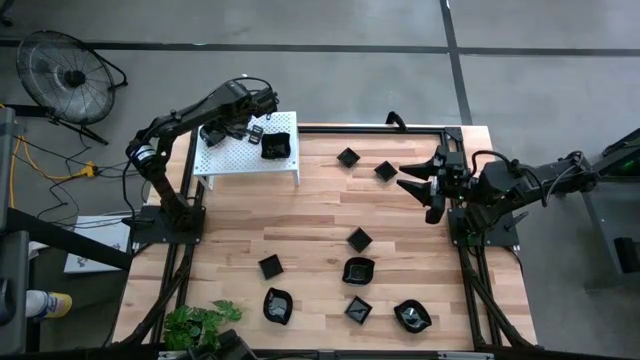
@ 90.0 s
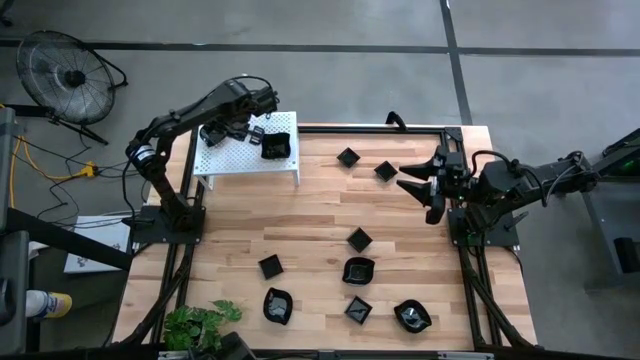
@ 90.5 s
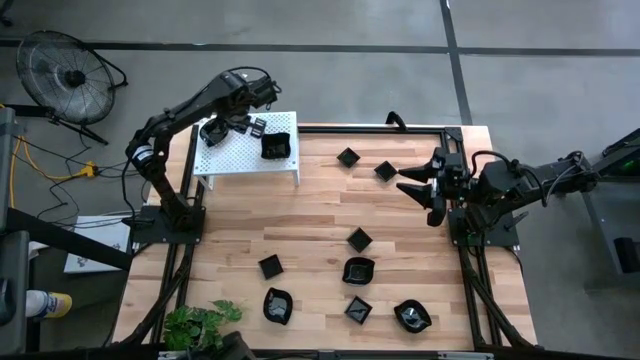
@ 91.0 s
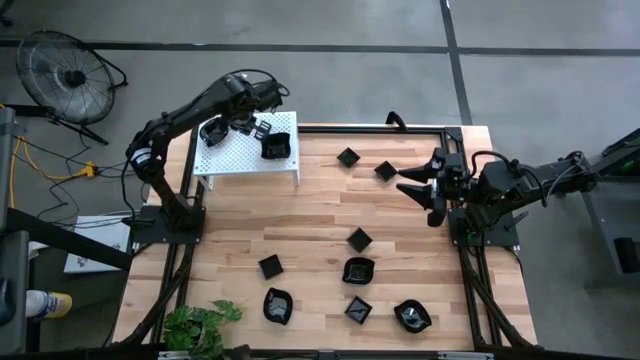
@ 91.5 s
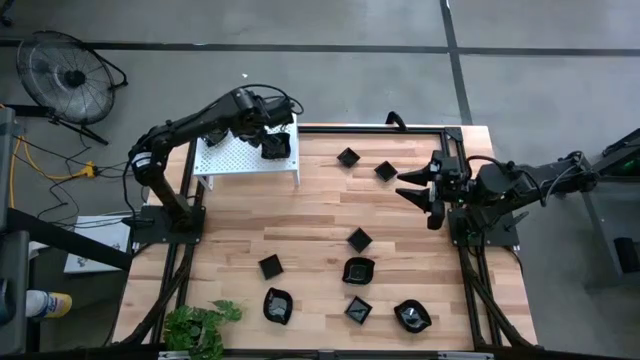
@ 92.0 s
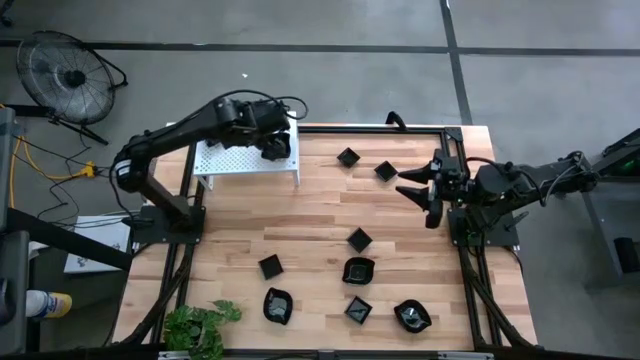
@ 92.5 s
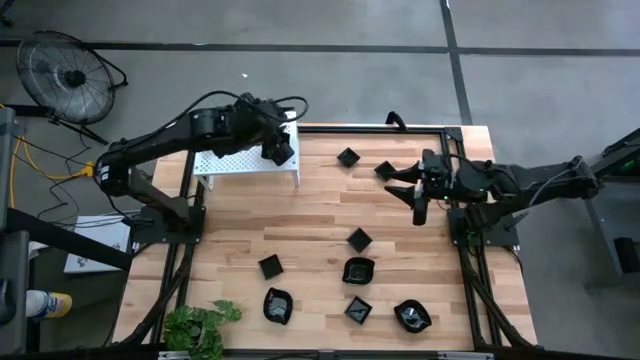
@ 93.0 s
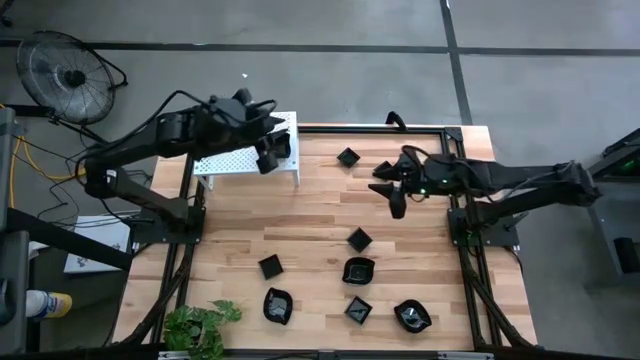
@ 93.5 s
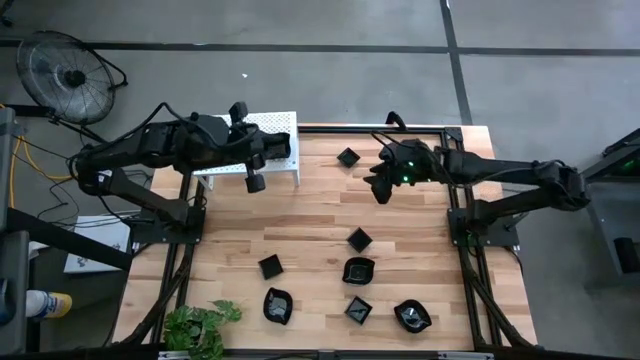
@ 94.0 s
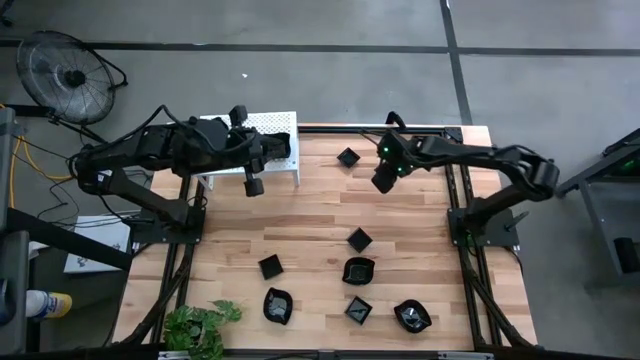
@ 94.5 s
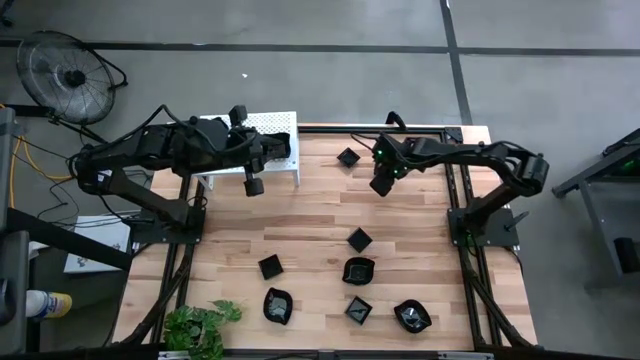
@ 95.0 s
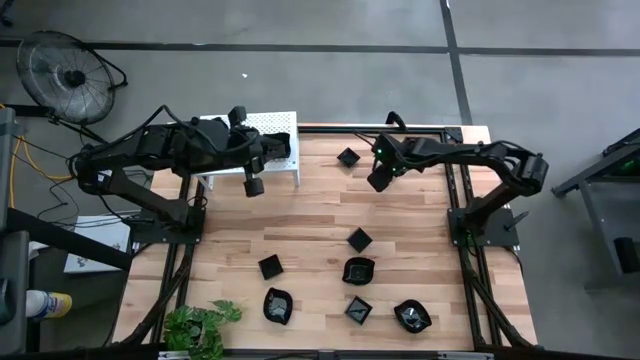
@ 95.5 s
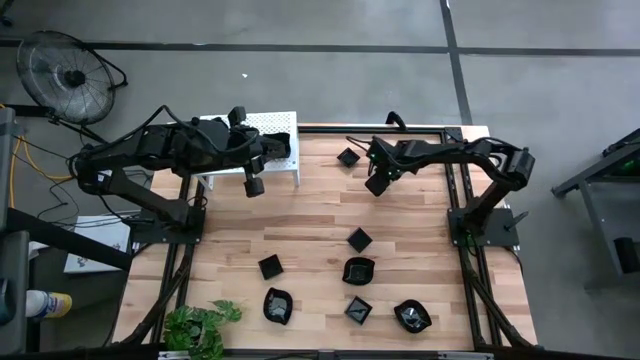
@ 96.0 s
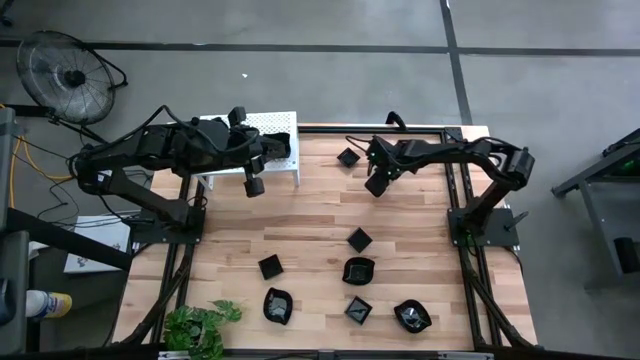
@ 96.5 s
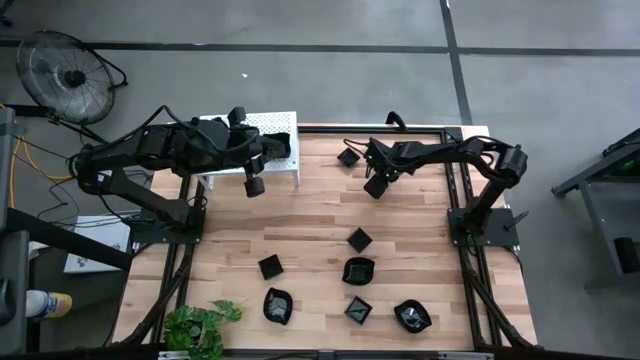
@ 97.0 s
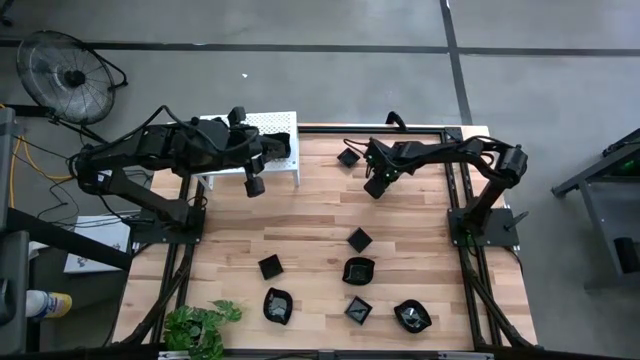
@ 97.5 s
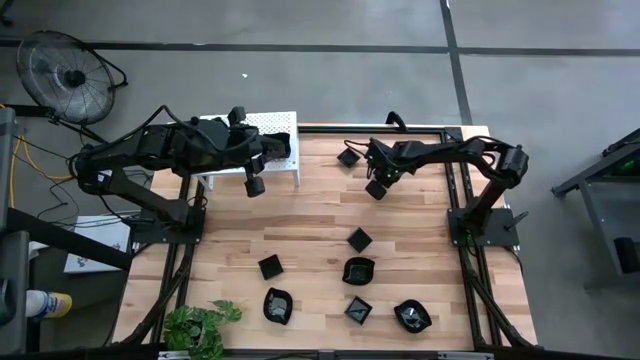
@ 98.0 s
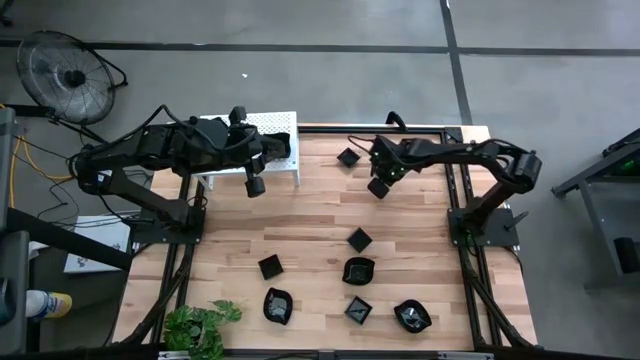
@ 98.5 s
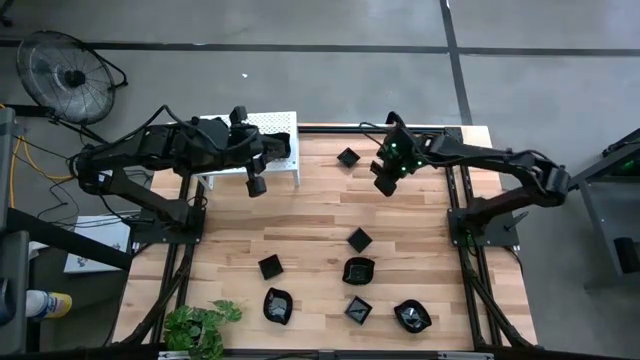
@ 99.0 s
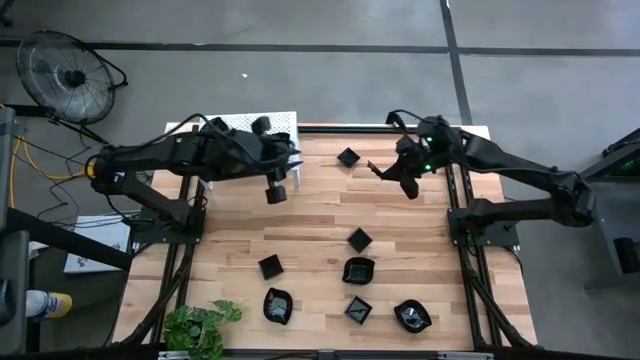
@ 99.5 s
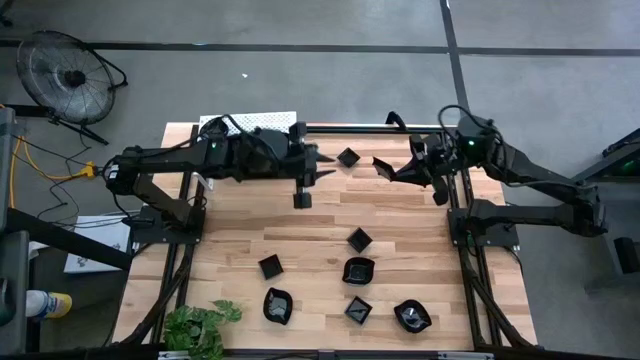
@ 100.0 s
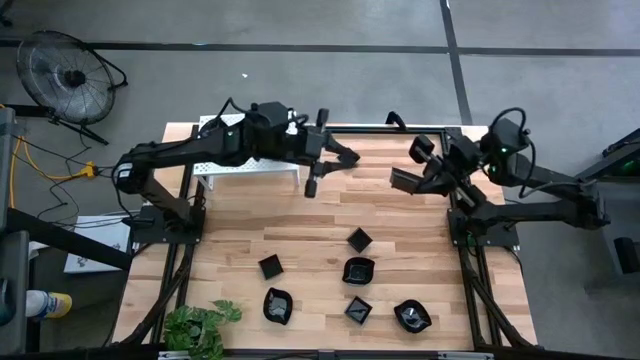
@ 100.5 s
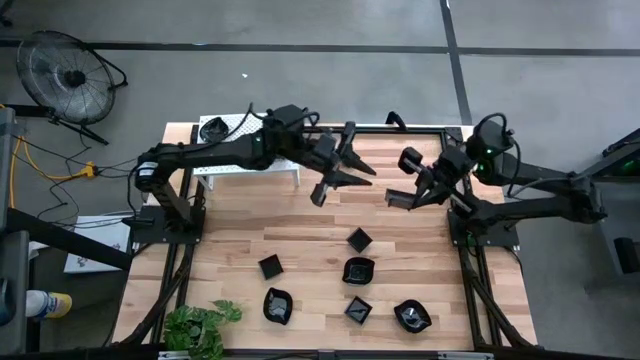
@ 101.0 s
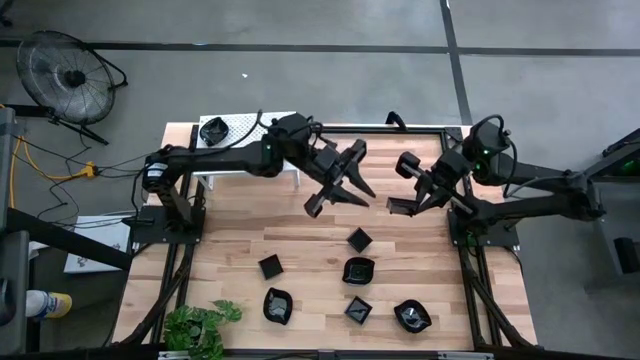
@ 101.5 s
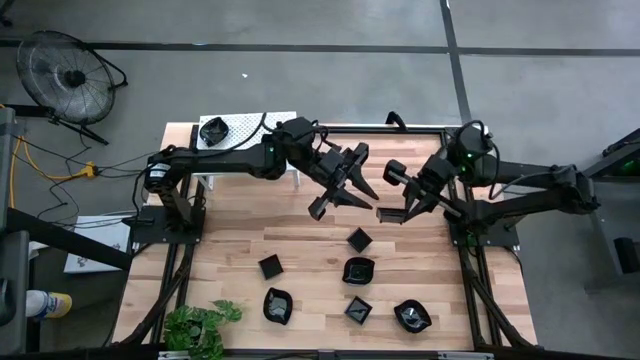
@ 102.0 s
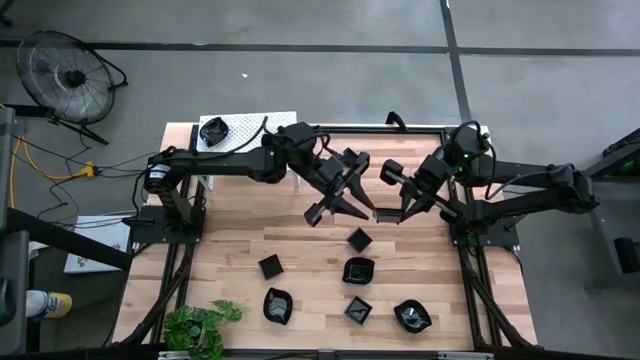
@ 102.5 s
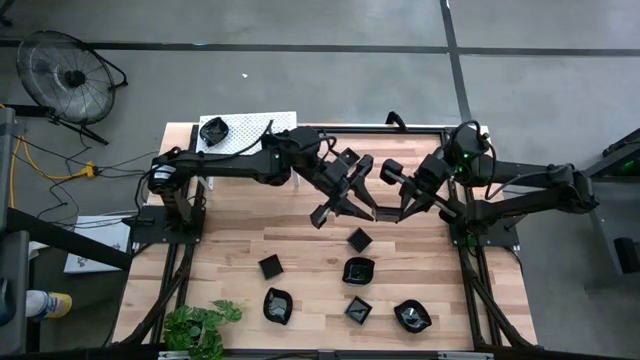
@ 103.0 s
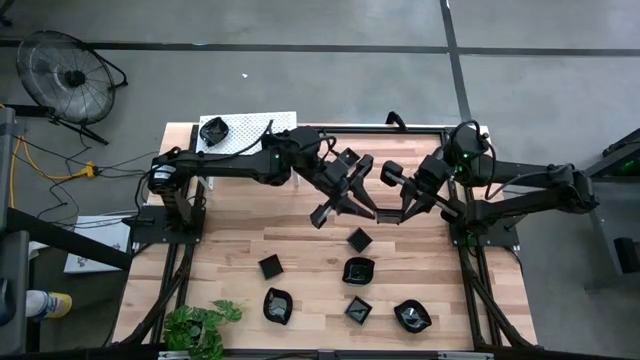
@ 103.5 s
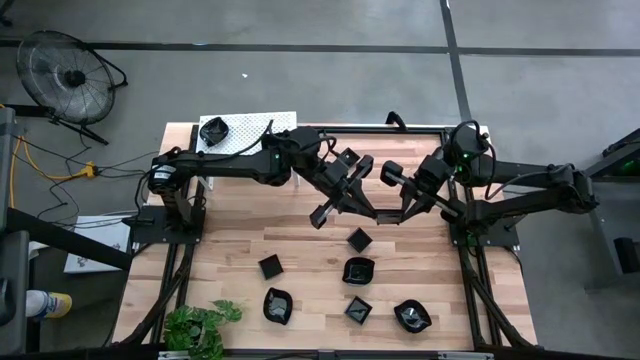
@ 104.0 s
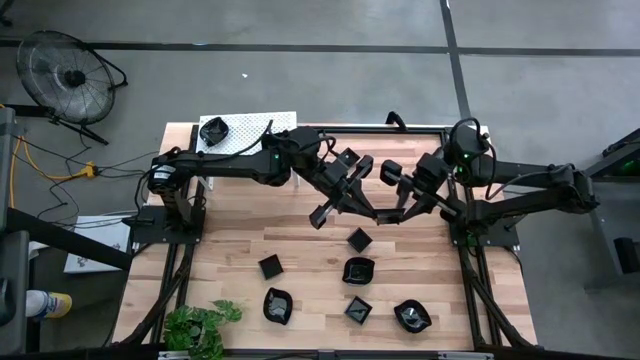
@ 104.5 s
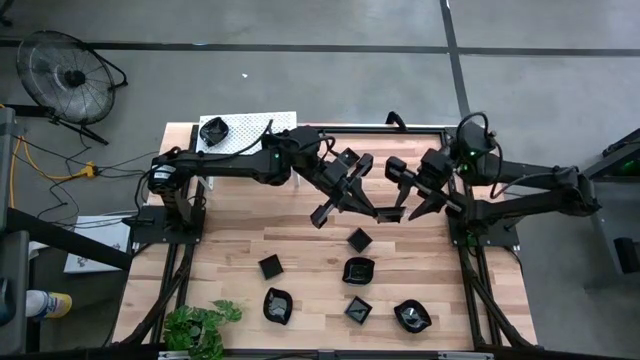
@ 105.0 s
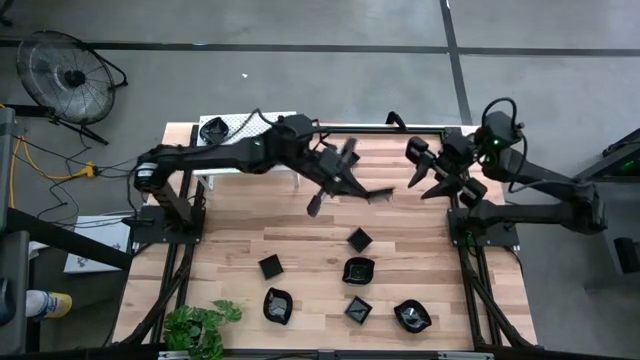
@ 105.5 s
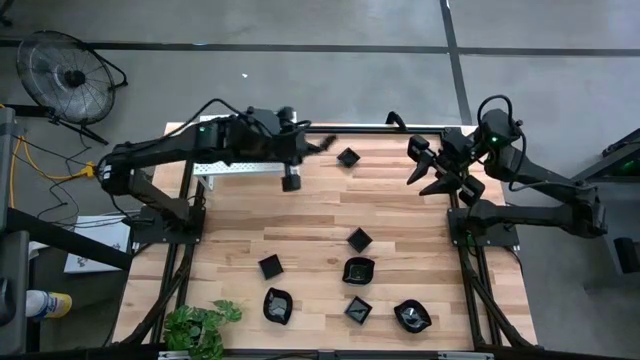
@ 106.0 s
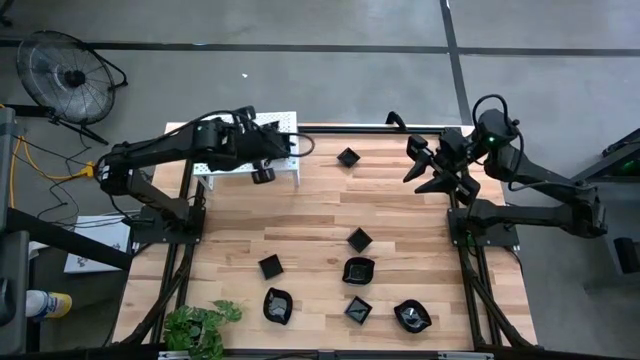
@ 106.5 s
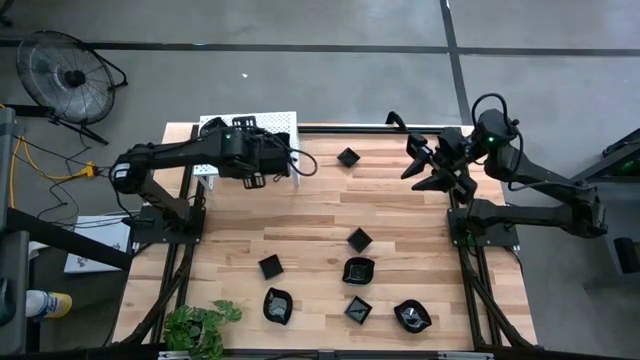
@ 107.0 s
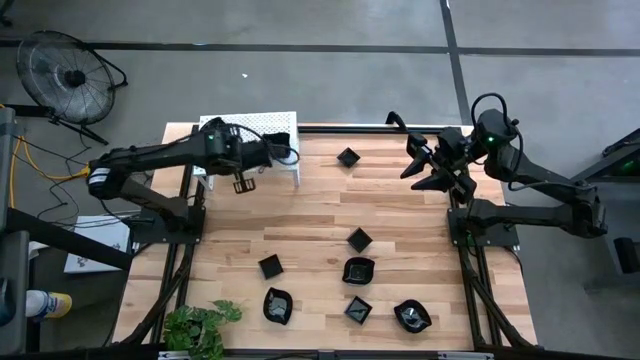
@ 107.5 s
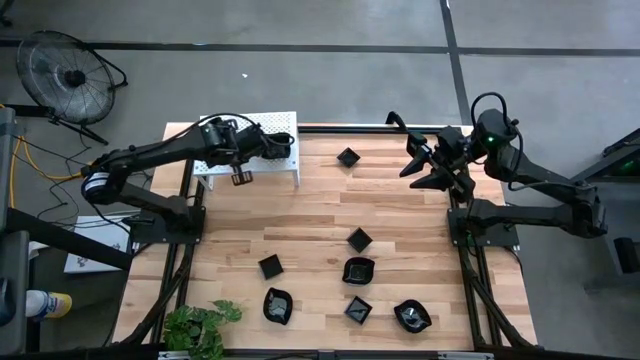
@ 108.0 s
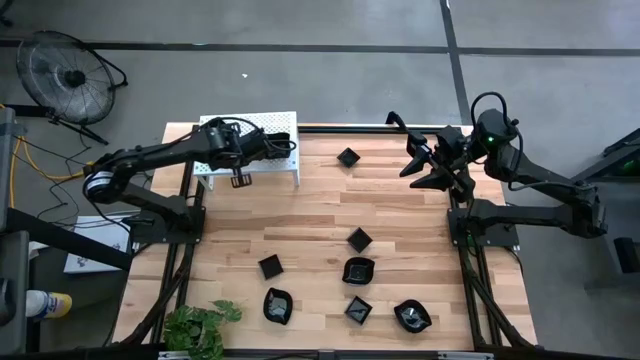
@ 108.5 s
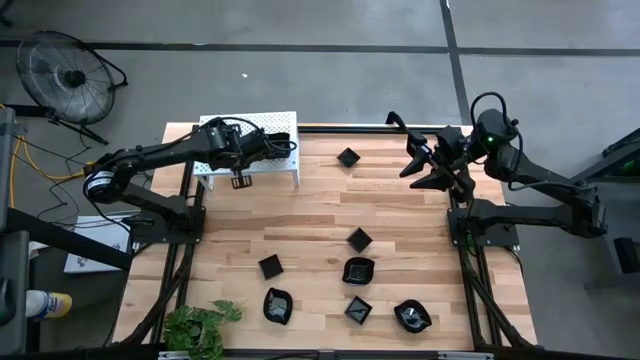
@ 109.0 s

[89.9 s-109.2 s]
Task: Pick & Place Mini shaped plates
Put the black square plate on the shelf

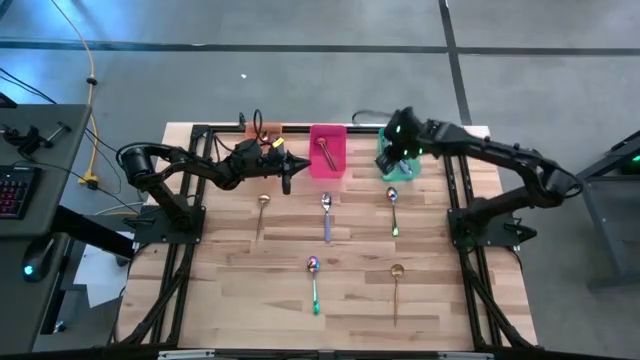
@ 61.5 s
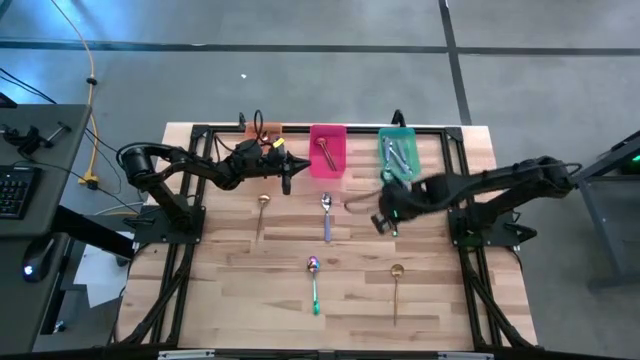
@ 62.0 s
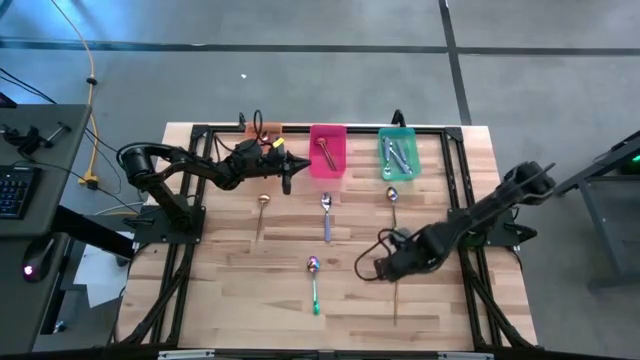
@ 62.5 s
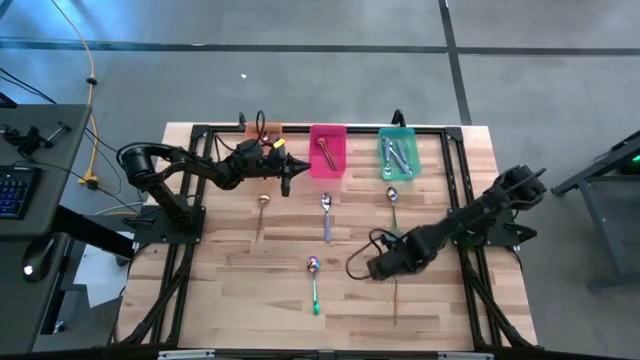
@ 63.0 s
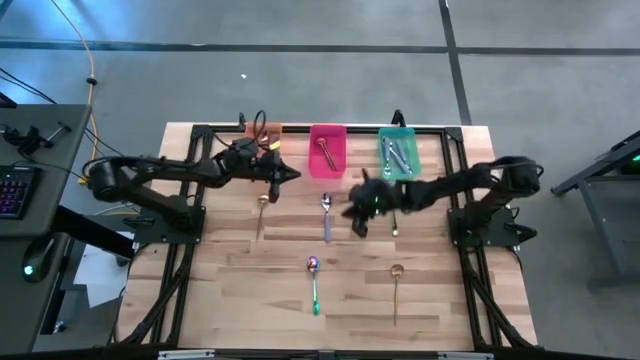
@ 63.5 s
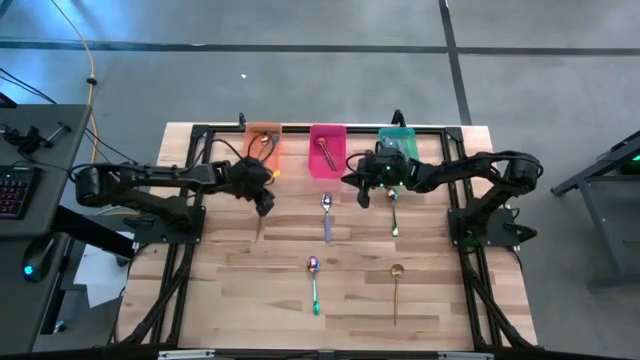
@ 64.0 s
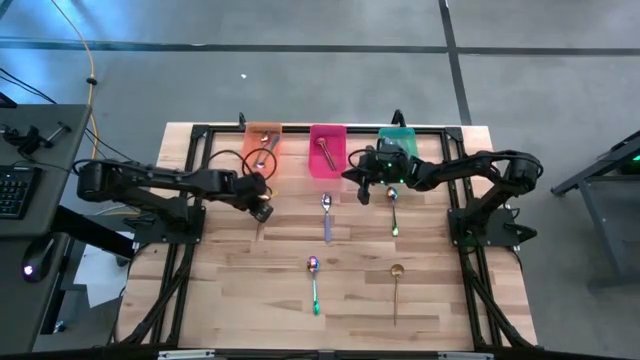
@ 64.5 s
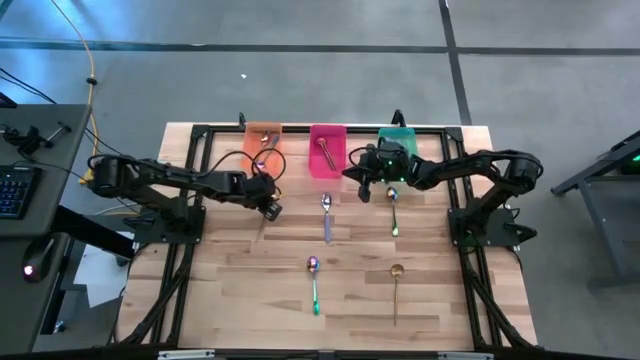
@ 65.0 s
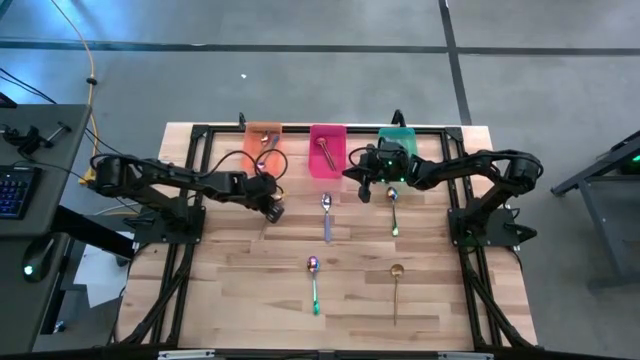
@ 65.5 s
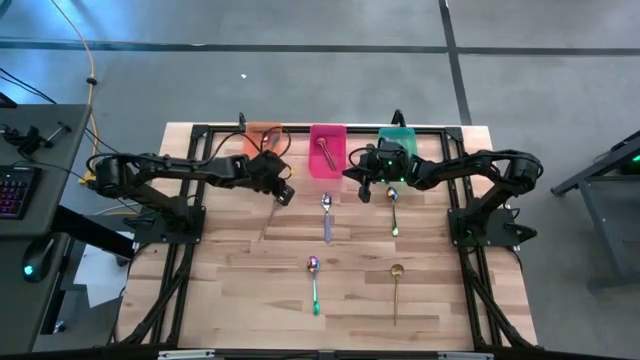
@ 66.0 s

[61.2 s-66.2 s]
Task: Sort silverware by color (type)
Put the top yellow spoon into the red bin
